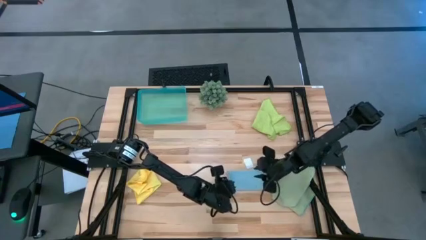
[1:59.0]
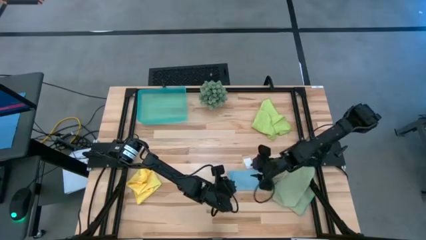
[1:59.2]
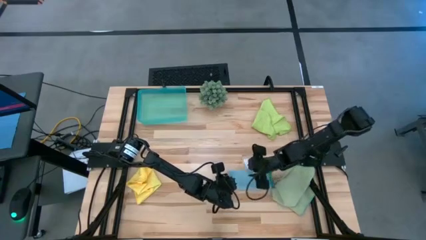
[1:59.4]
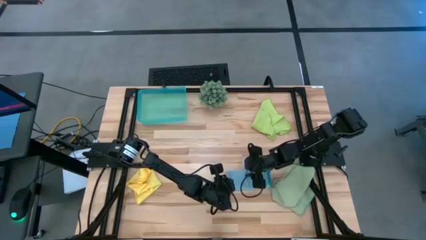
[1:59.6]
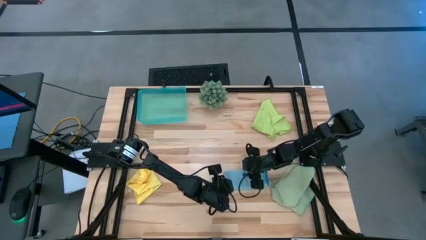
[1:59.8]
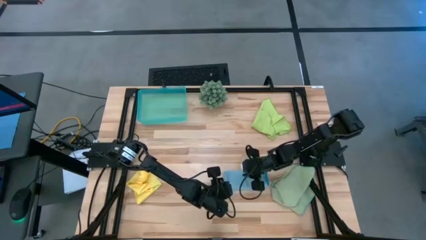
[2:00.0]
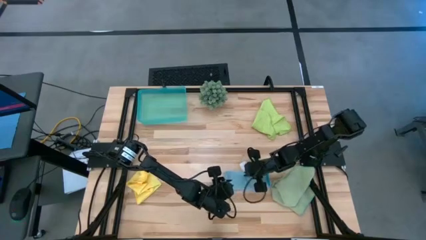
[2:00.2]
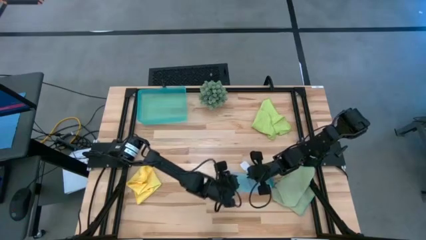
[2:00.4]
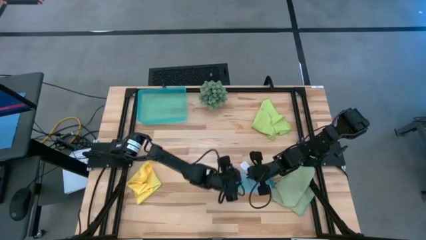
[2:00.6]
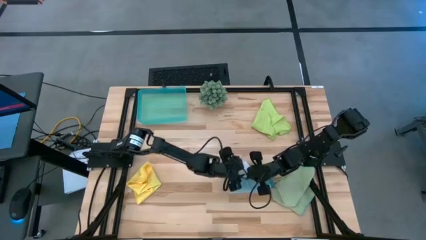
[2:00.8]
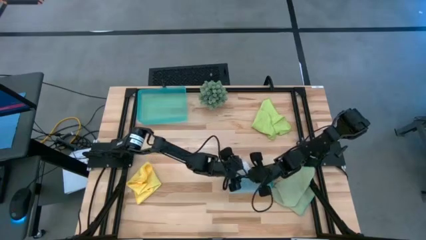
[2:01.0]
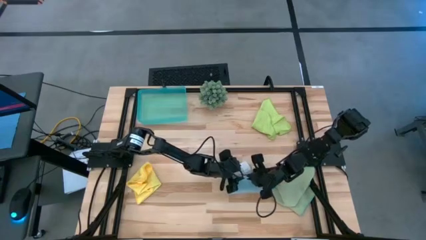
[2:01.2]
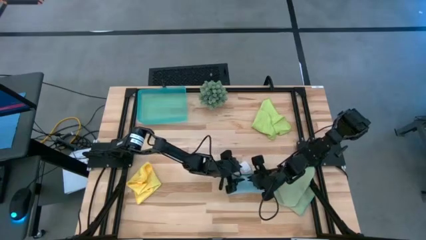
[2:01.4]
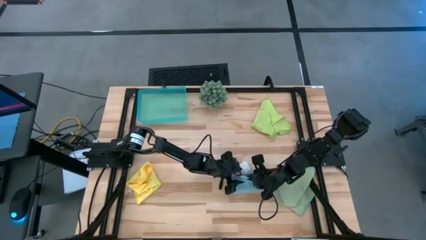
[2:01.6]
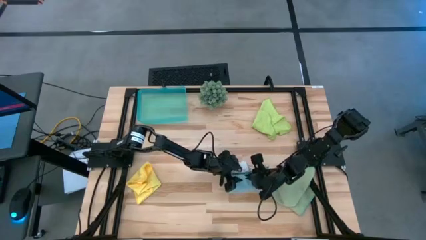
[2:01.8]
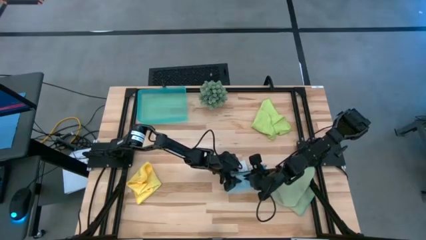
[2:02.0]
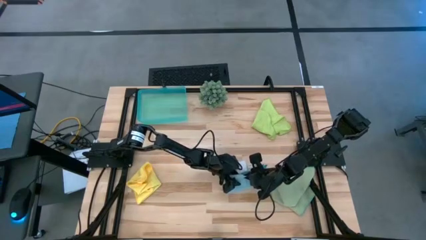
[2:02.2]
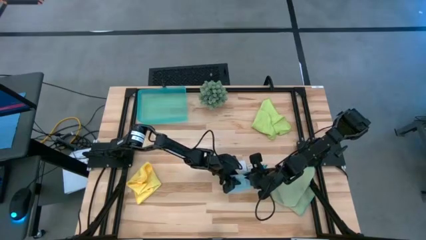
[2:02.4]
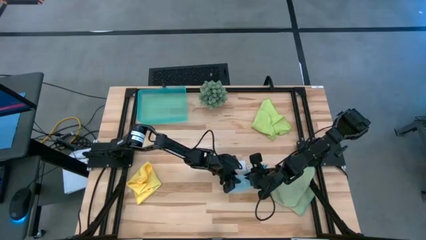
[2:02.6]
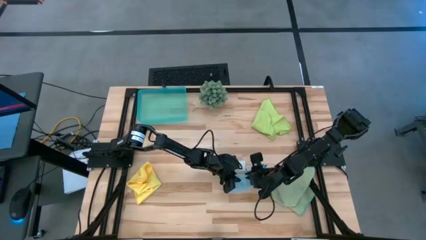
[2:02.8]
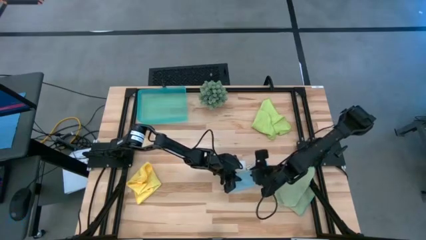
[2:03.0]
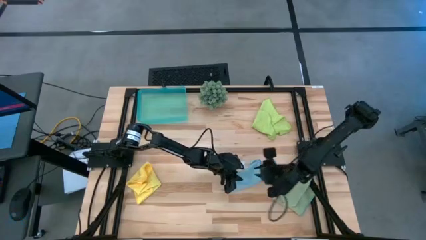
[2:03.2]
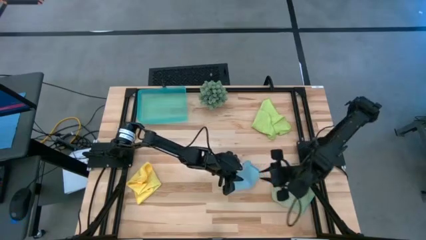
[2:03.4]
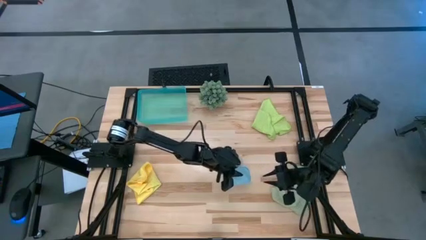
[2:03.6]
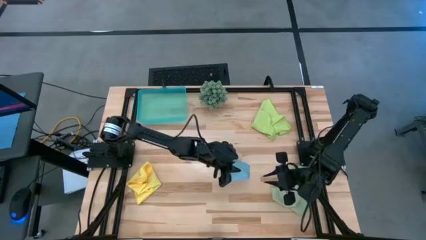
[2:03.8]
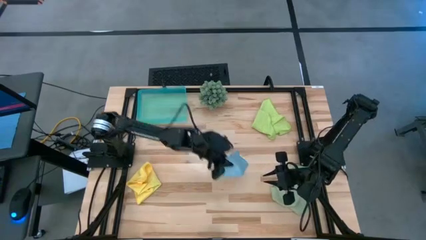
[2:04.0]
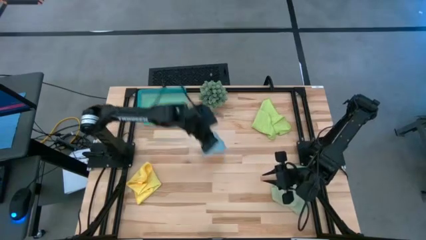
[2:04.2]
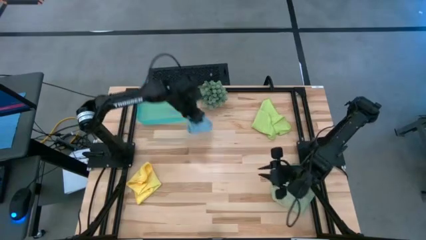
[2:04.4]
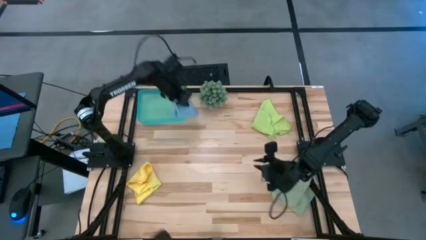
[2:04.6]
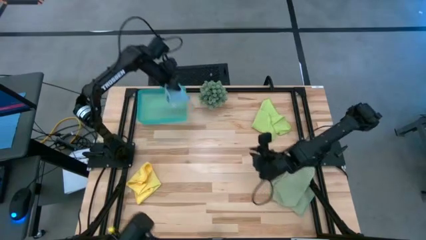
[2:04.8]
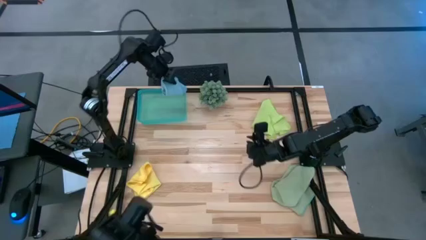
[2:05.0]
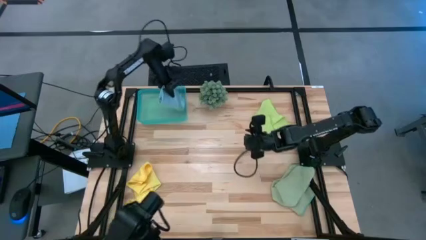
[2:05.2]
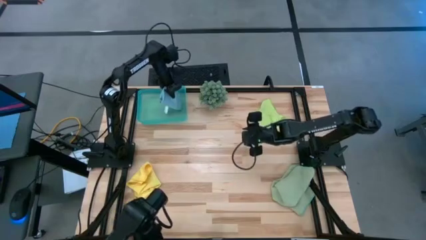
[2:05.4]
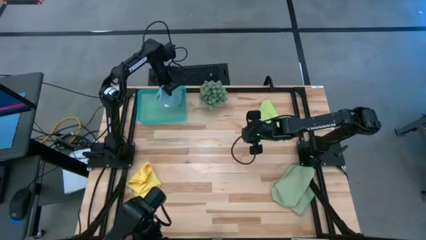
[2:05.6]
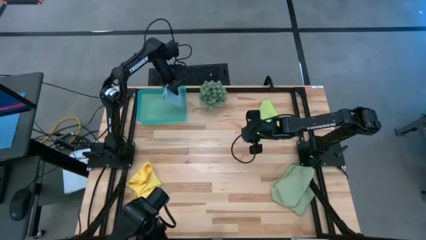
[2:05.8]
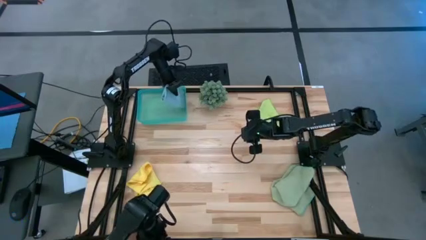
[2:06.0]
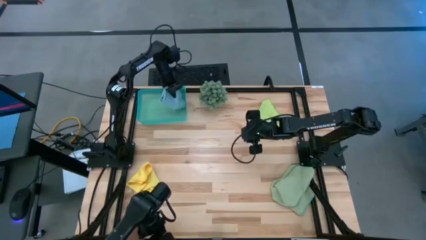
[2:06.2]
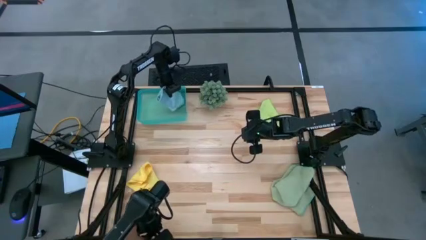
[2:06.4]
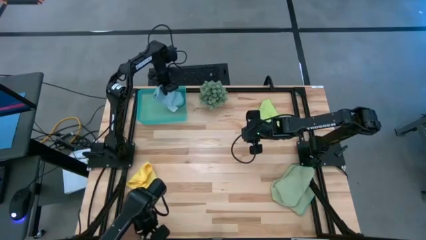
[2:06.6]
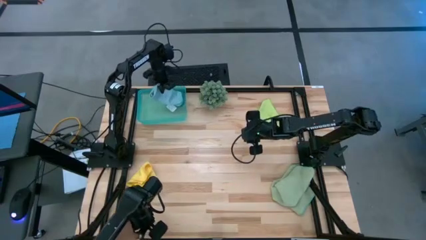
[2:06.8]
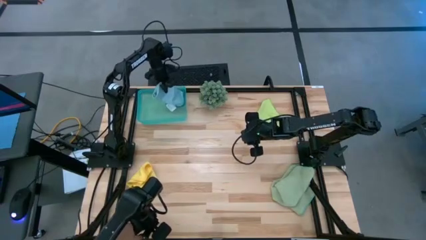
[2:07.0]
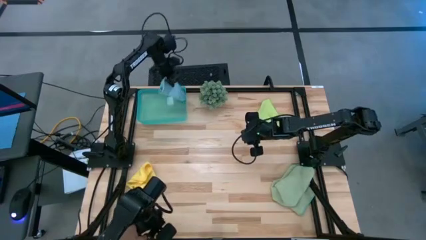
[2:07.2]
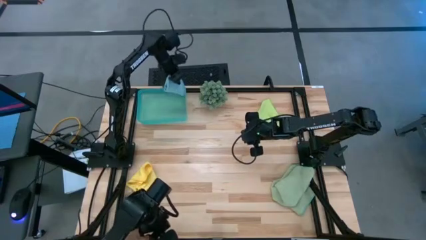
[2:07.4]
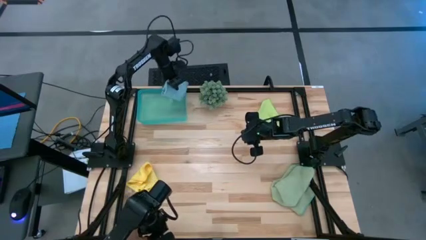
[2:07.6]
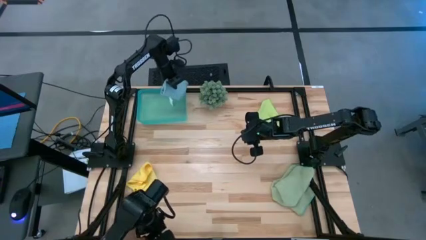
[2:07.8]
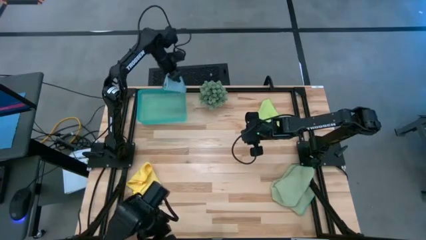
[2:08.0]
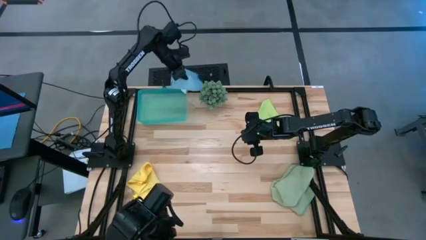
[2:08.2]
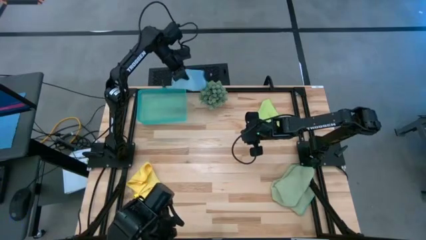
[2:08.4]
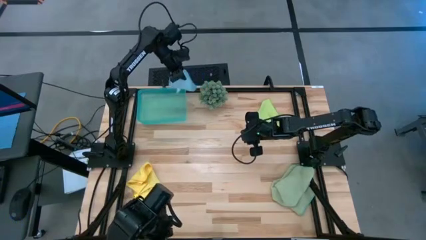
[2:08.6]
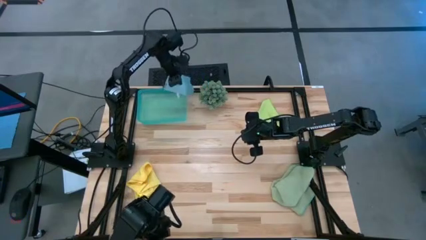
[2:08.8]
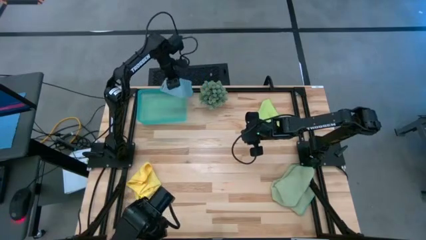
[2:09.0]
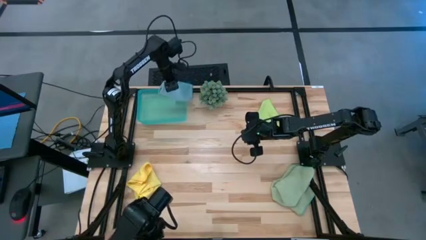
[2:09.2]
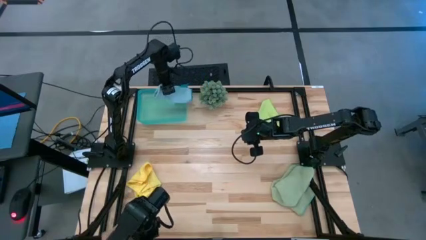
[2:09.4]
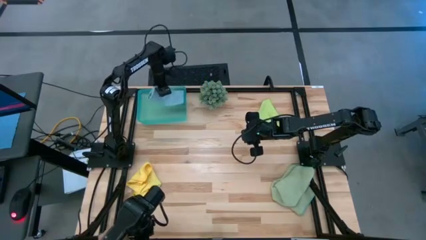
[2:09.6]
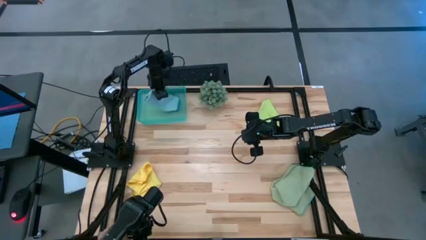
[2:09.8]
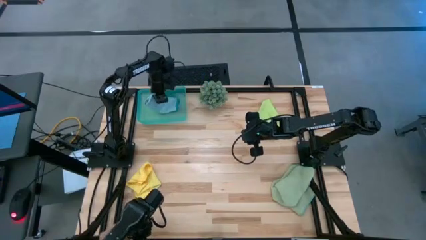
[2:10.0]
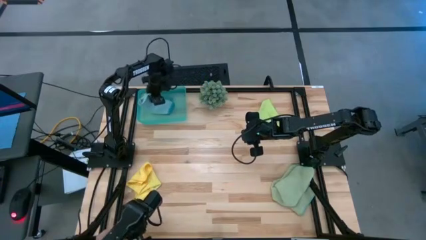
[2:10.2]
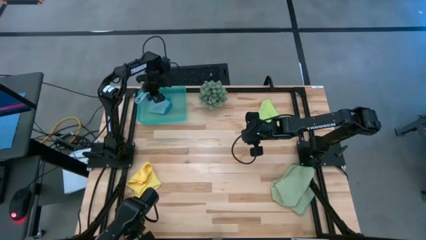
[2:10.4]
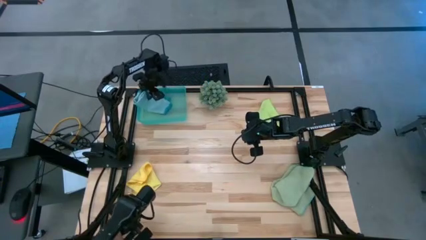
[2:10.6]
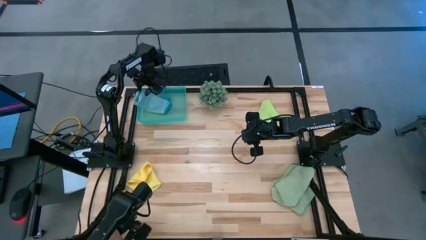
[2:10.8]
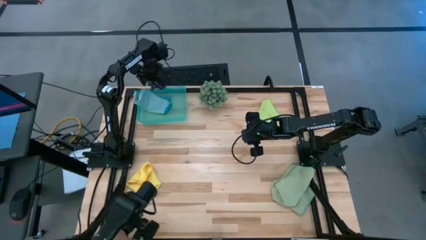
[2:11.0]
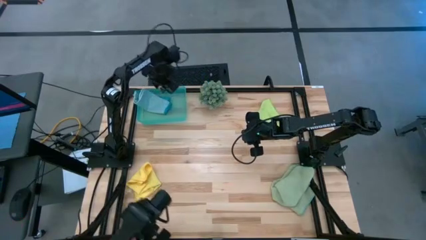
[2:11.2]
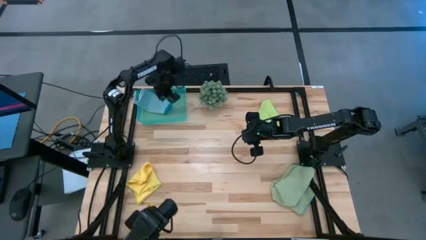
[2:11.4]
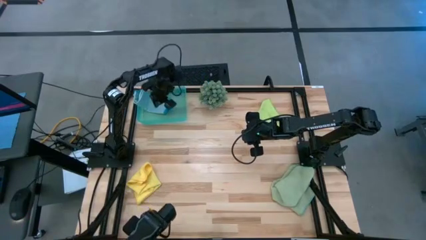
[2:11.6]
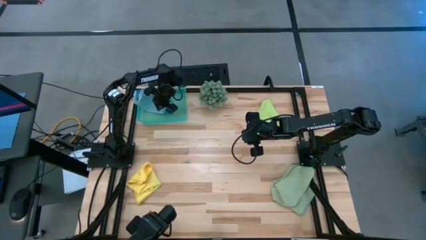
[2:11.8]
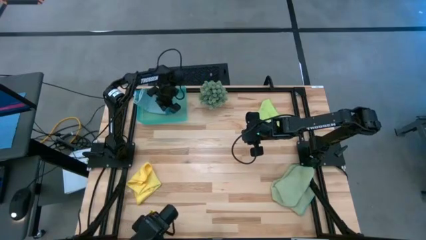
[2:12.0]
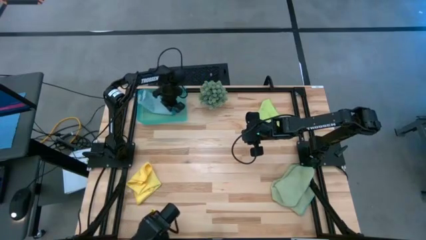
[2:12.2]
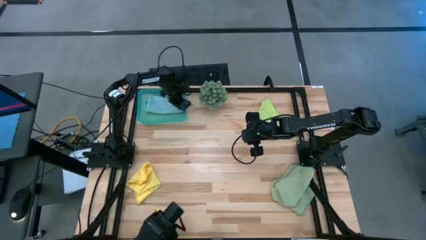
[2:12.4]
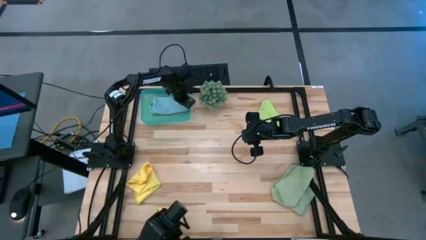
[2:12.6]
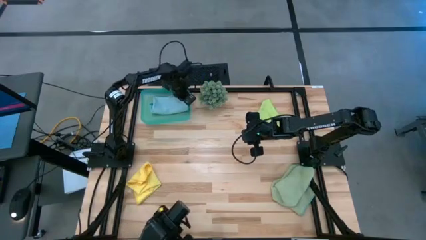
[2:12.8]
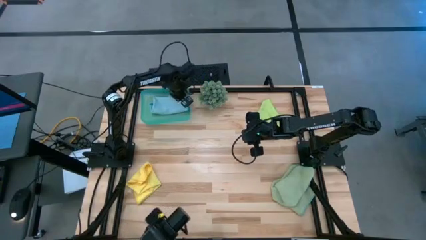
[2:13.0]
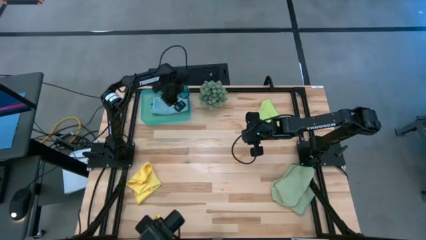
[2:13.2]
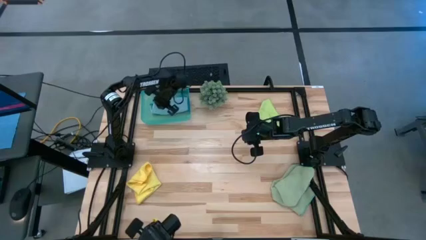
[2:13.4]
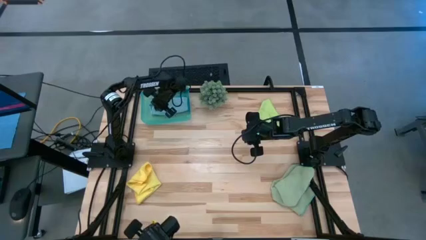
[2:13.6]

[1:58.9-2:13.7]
Task: Fold microfiber towels
Put the folded blue microfiber cloth into the blue bin
